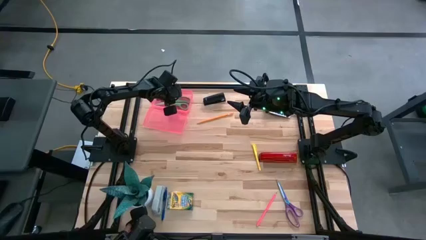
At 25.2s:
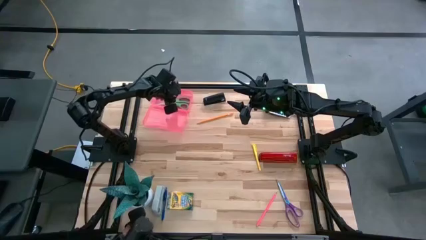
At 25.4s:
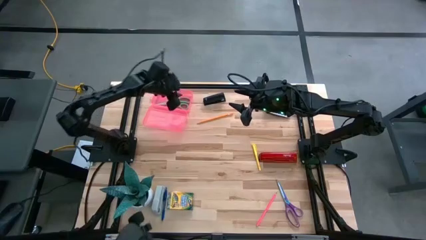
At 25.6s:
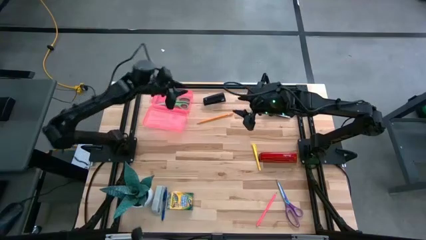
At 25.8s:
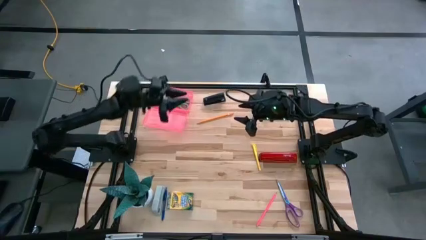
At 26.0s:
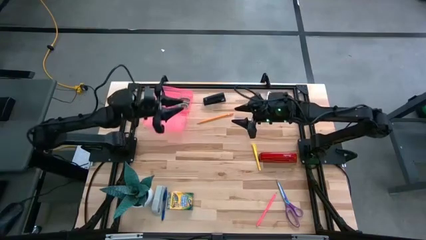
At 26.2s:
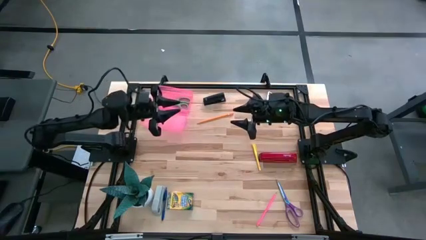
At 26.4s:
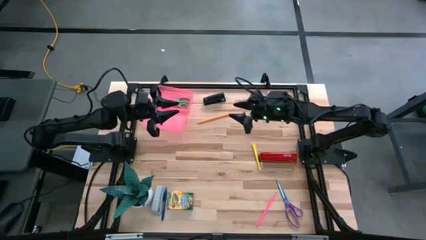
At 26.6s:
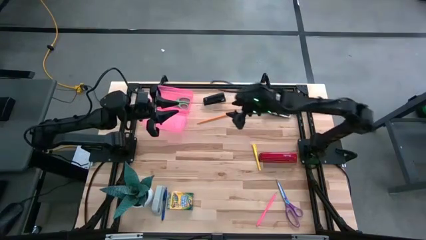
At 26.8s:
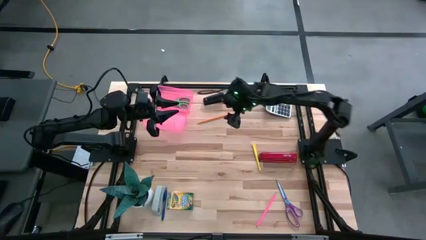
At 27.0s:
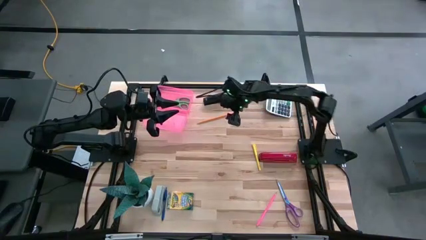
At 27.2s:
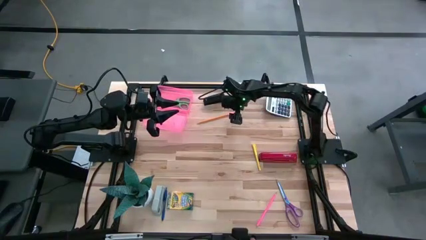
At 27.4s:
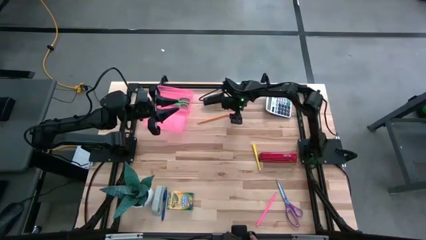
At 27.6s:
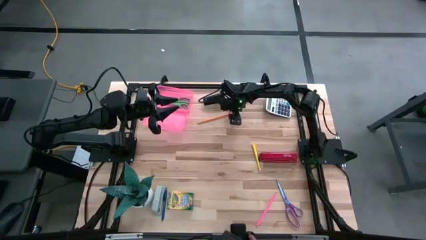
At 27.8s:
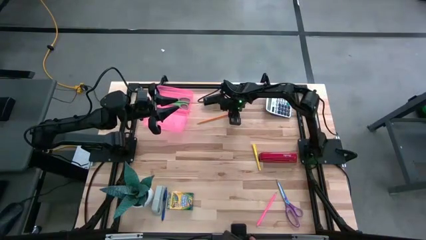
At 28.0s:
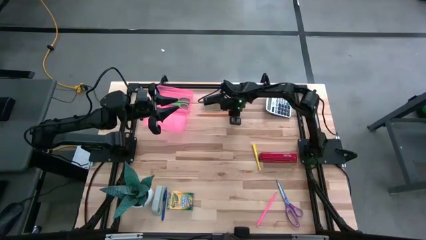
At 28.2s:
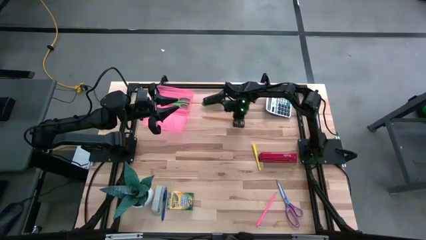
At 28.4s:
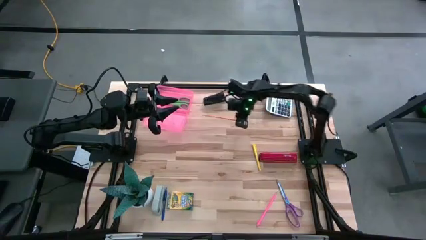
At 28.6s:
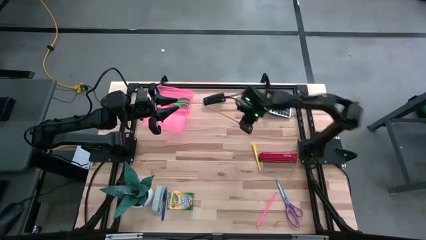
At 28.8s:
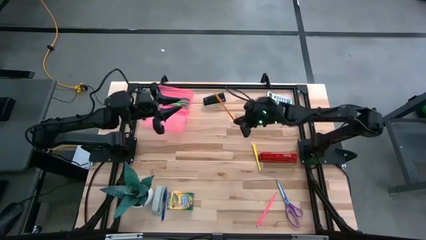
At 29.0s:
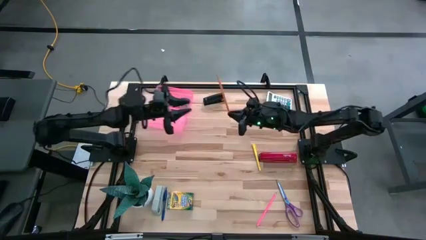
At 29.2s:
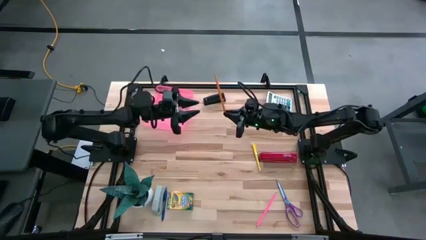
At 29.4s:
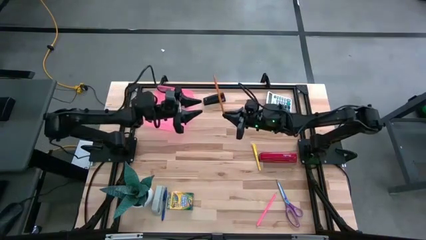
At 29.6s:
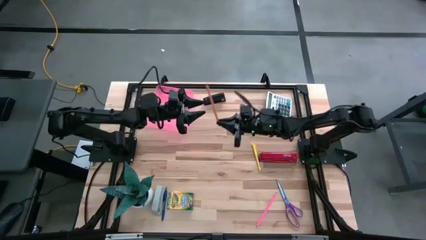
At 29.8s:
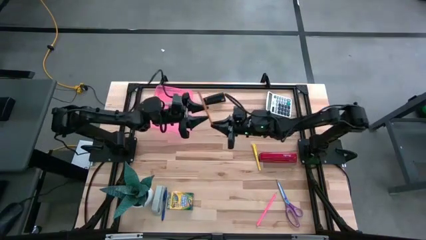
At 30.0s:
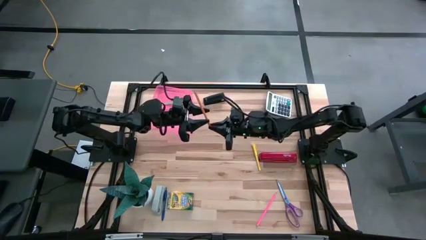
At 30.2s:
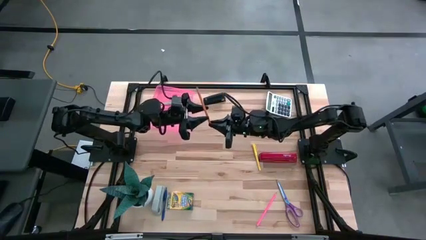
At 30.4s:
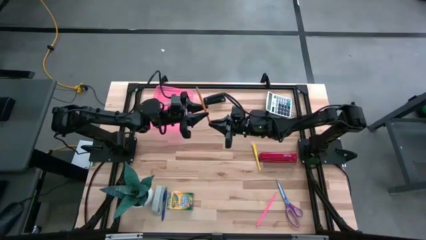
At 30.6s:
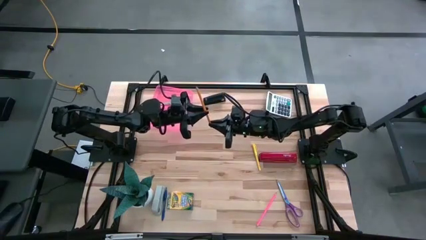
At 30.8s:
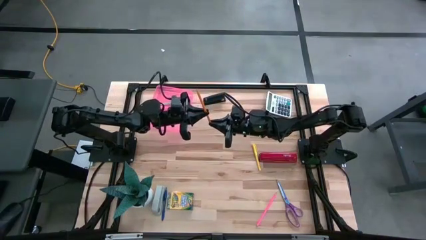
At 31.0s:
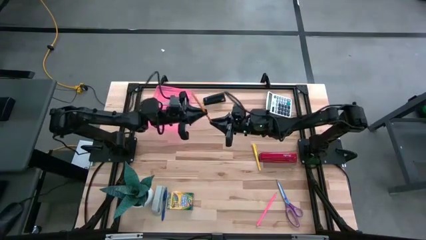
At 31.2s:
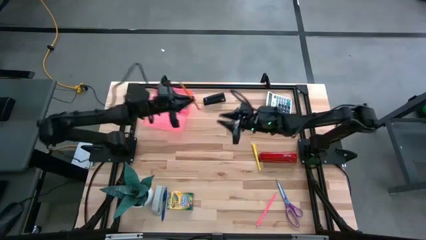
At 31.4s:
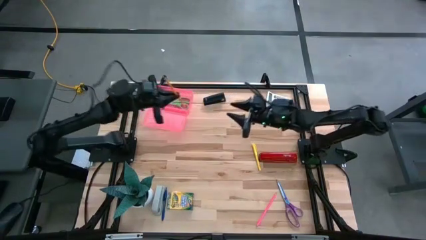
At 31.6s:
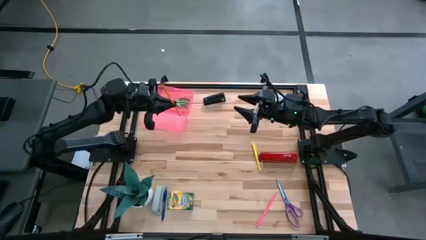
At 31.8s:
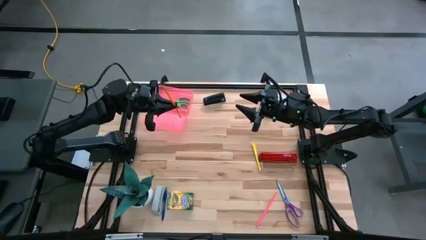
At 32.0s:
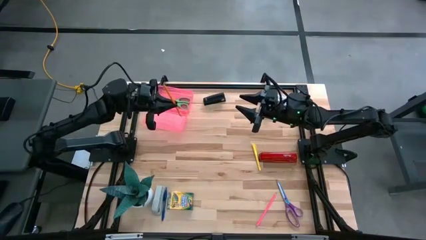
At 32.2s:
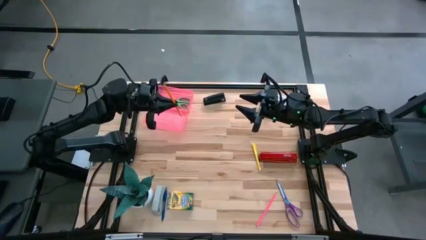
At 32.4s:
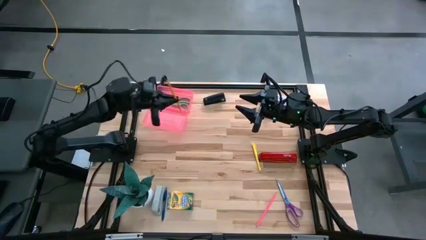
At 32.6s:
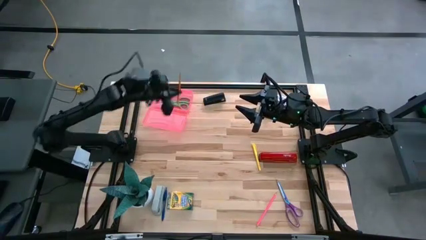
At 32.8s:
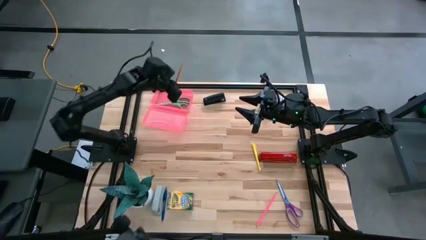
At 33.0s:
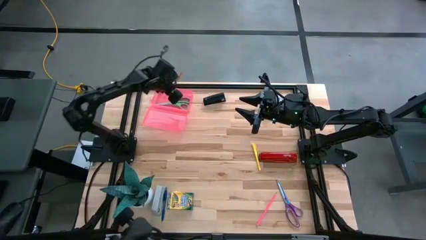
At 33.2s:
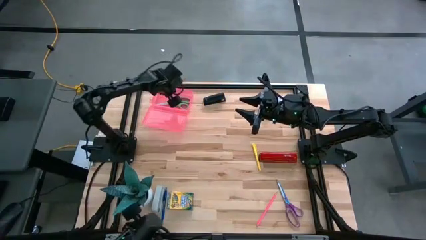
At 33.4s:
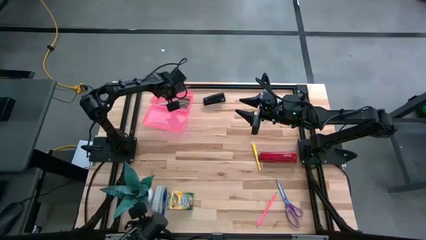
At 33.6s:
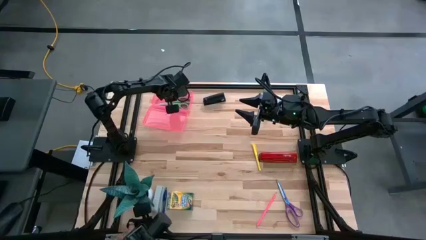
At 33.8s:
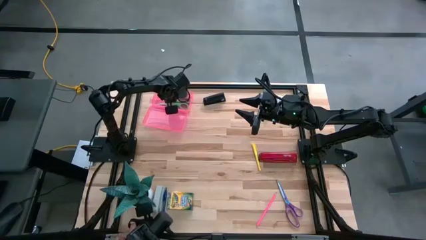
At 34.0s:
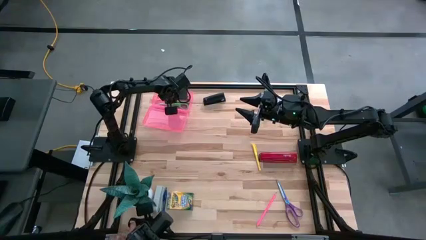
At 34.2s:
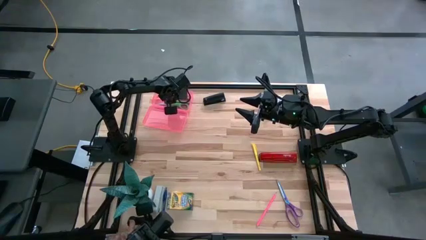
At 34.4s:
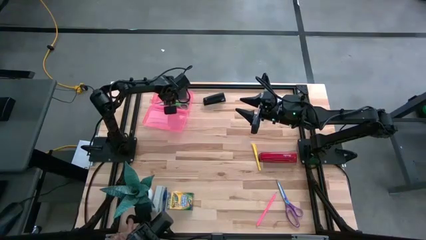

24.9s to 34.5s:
Task: Pack school essentials
Put the orange pencil into the pink supply box

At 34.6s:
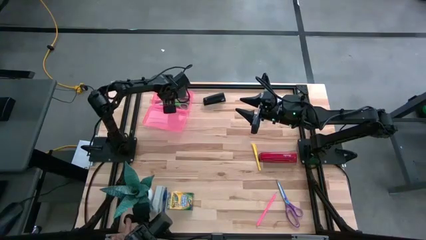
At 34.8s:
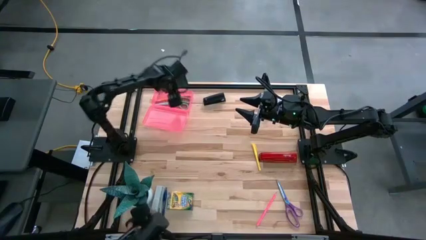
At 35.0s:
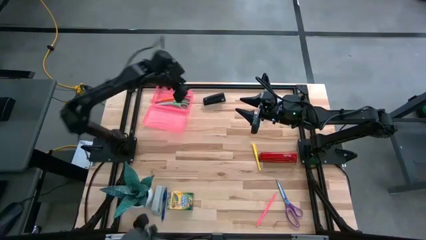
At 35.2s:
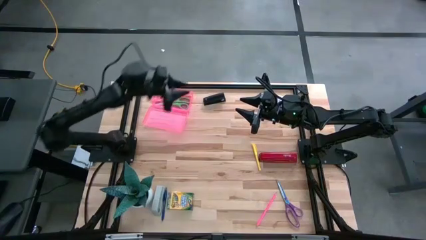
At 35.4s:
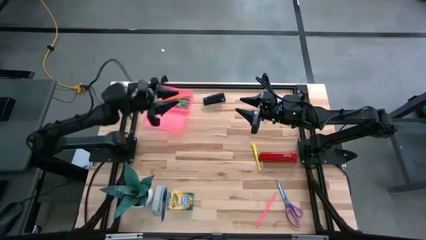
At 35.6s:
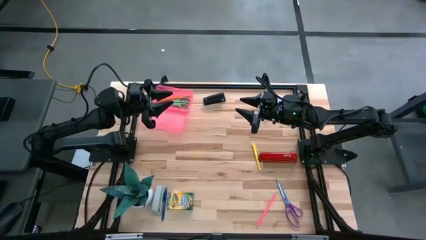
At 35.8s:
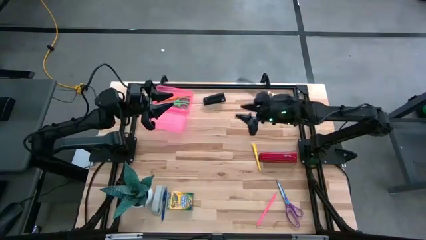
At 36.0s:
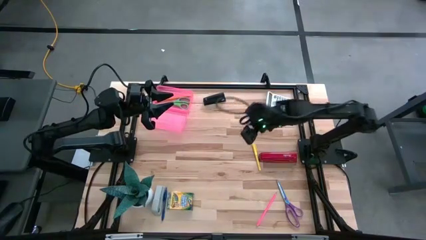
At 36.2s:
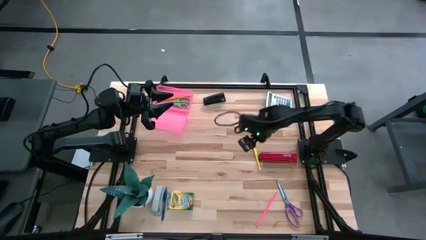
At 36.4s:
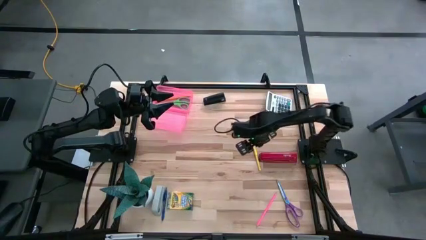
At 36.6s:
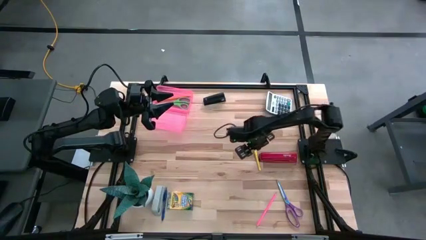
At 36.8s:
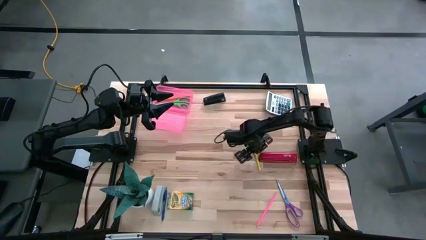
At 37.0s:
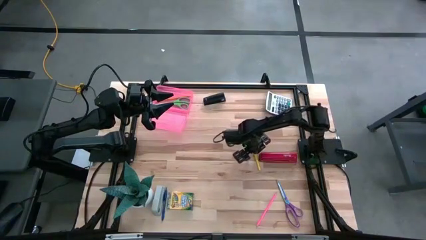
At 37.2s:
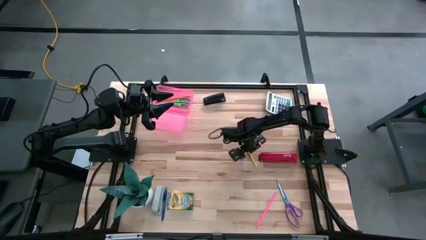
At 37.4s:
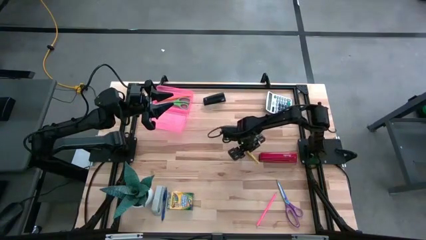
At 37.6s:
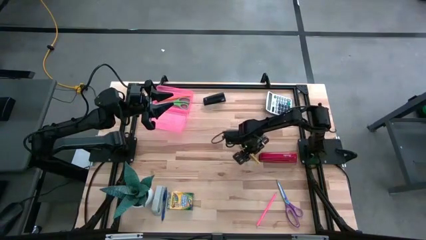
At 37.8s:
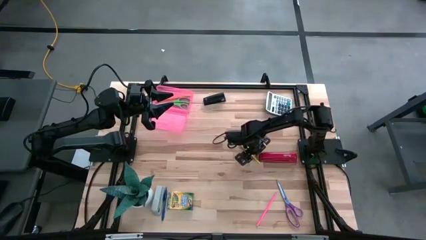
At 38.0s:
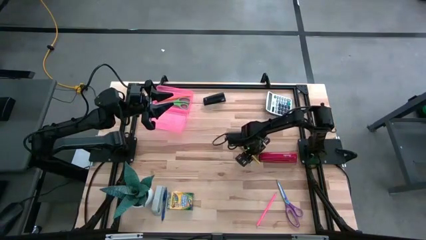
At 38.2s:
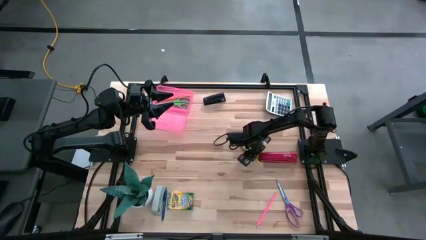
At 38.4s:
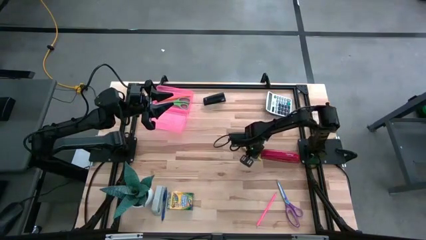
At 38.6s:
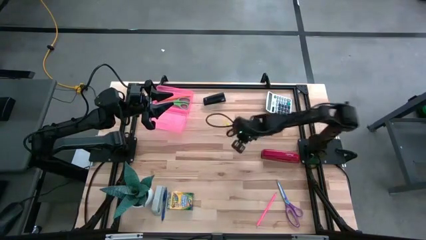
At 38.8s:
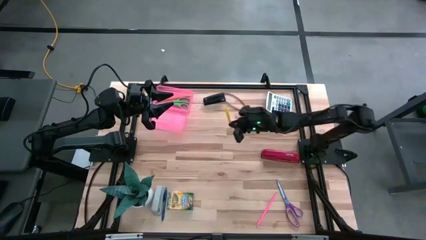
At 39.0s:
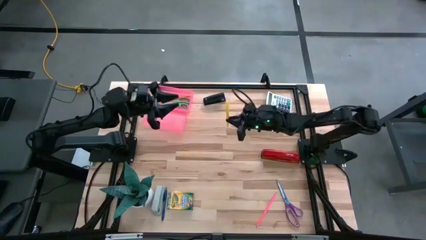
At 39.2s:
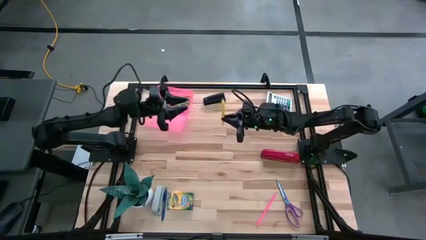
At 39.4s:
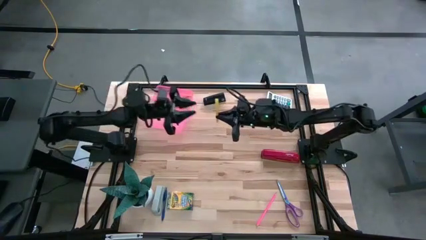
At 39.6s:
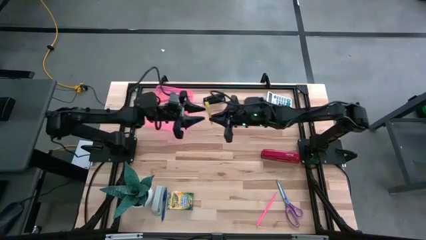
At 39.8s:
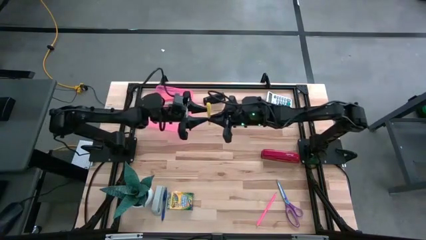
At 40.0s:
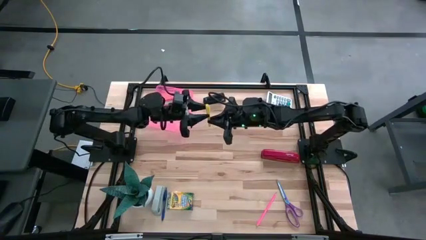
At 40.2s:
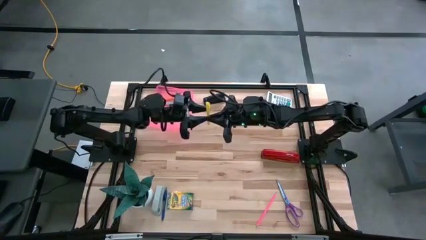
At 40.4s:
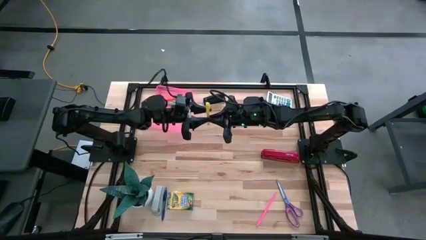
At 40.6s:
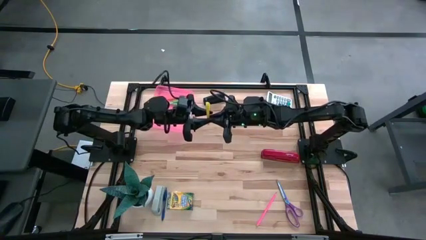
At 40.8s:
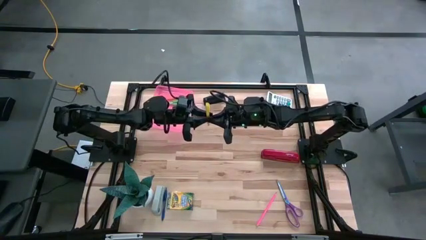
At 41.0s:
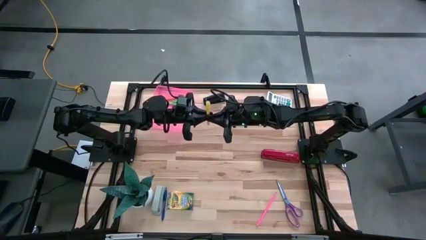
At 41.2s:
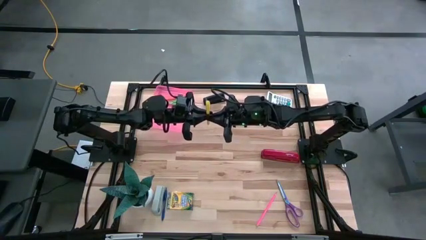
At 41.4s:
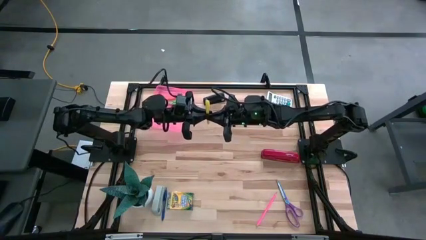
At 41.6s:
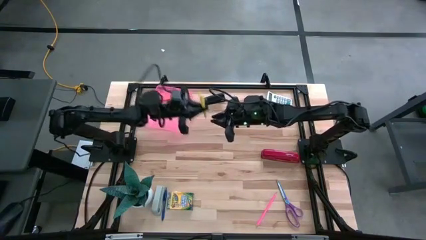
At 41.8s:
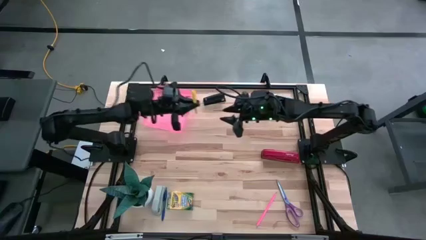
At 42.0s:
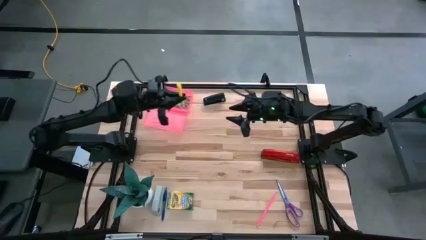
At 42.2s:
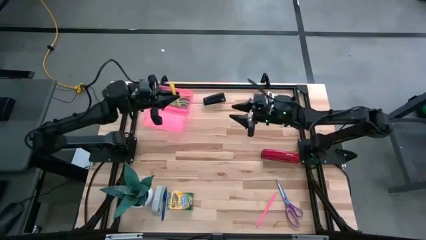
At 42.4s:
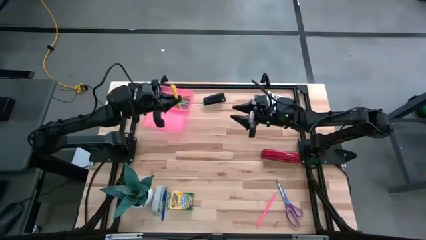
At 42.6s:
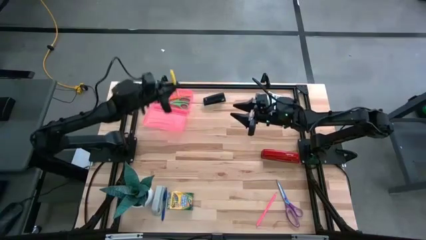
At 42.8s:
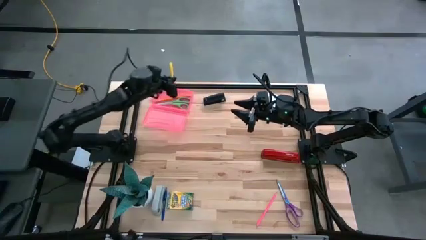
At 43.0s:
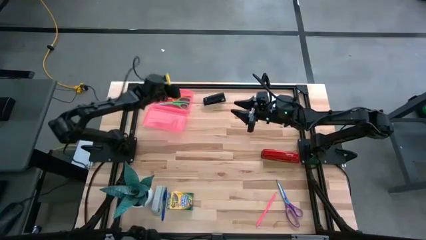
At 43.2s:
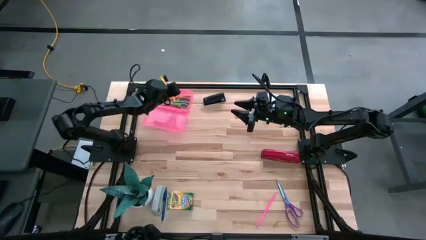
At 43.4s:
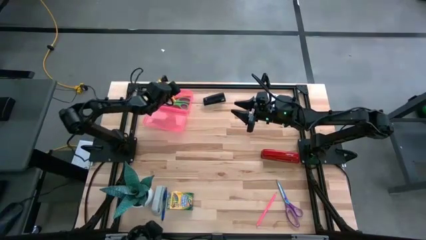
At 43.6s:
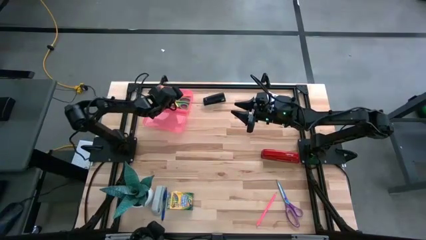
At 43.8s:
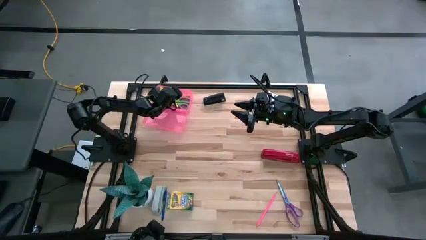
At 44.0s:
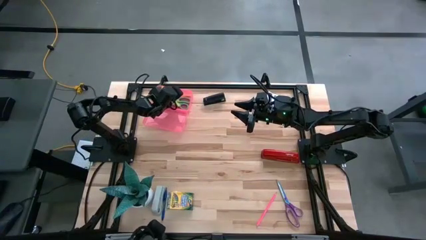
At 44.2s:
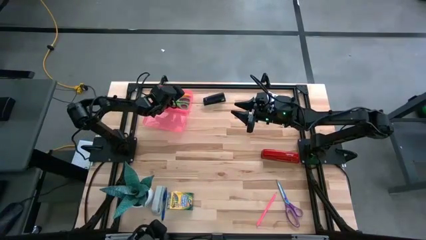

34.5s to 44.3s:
Put the yellow pen into the pink supply box
